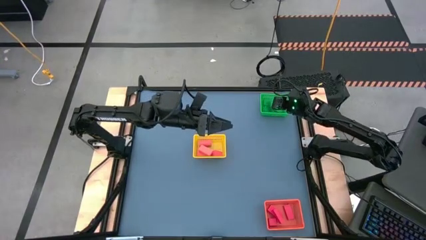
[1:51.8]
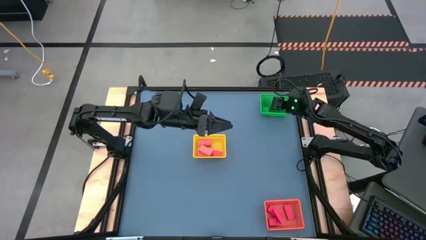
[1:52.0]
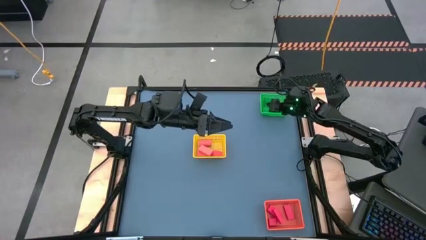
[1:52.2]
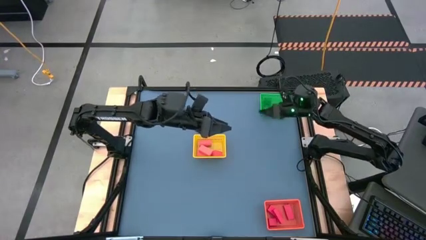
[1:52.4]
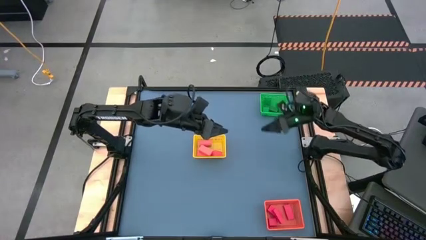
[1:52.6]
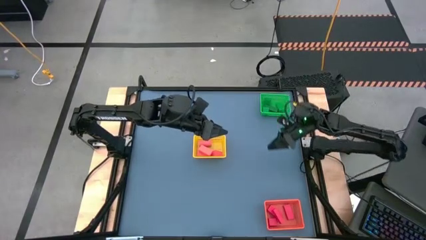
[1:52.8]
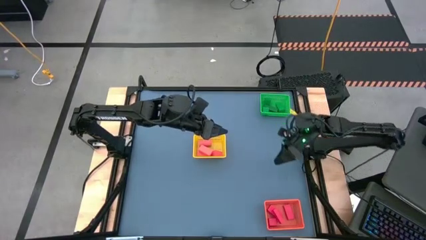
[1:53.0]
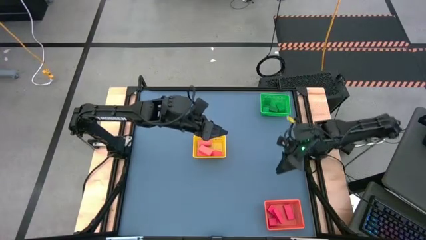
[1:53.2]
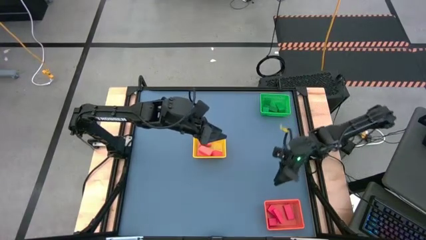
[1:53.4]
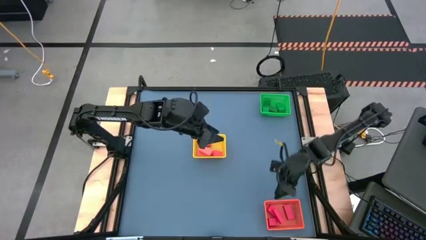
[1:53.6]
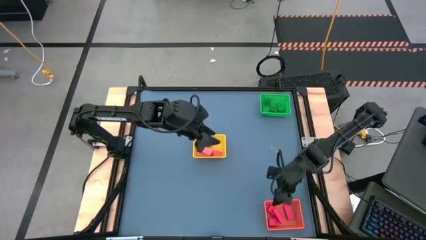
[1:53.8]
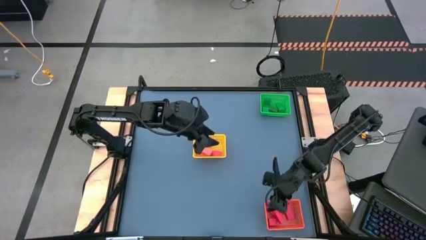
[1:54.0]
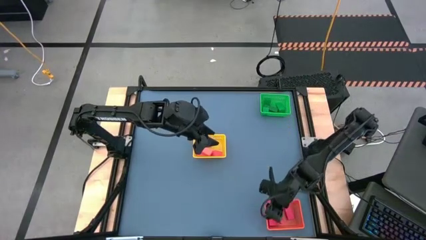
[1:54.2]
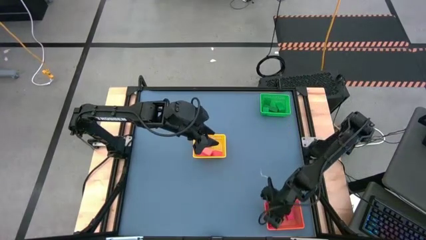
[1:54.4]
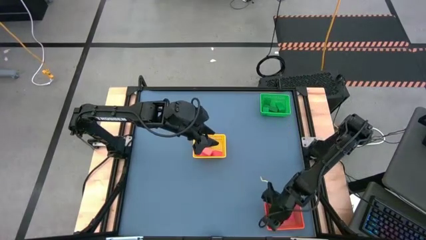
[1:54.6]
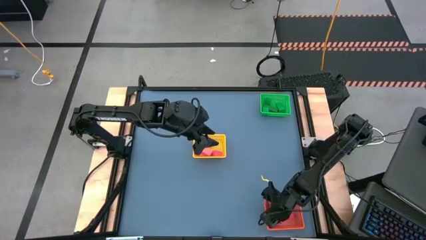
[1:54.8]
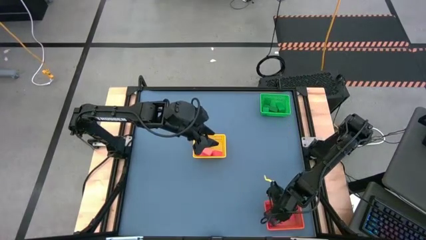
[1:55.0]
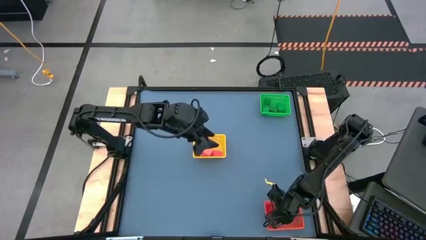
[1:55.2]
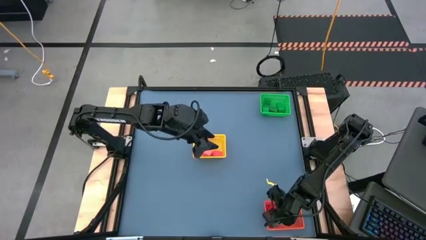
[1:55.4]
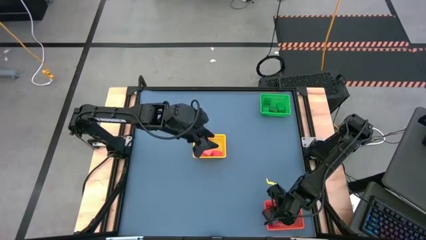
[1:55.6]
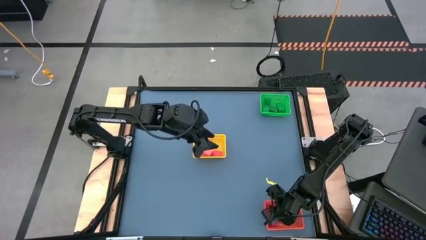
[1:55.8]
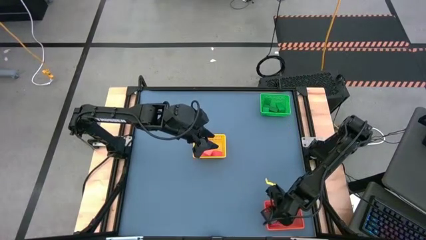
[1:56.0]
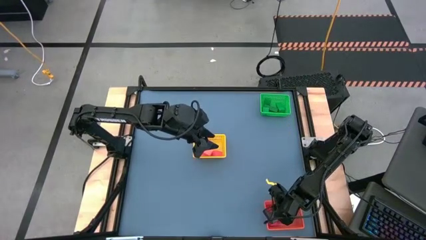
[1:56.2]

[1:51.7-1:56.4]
Task: Sort & place blocks by color
Adjust the red block in the orange basket

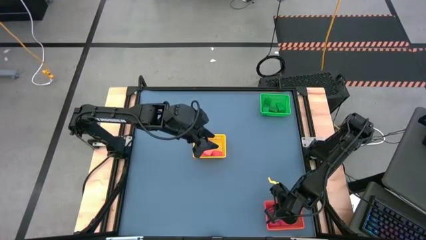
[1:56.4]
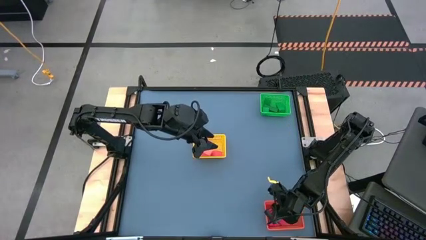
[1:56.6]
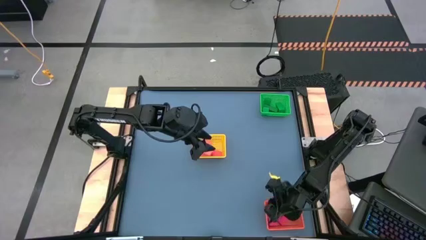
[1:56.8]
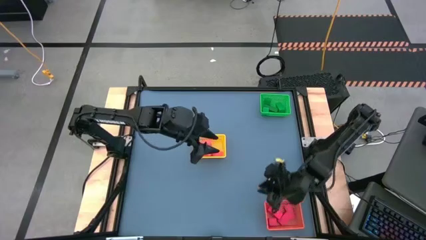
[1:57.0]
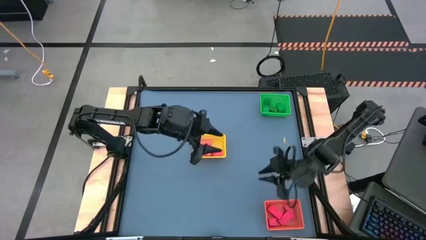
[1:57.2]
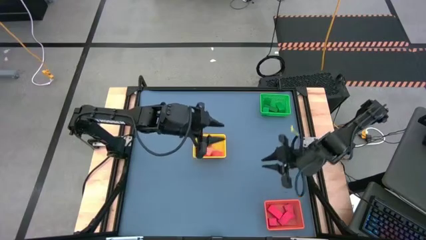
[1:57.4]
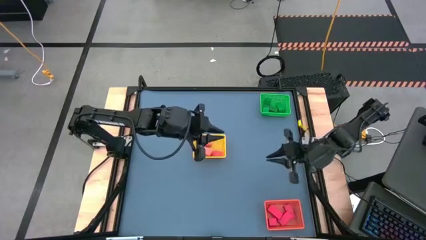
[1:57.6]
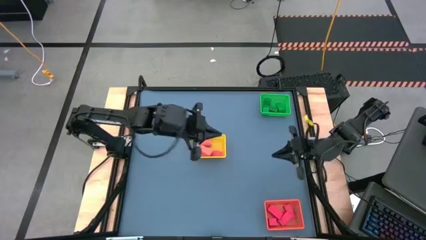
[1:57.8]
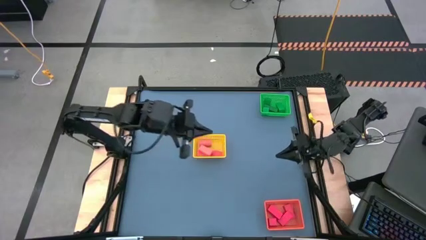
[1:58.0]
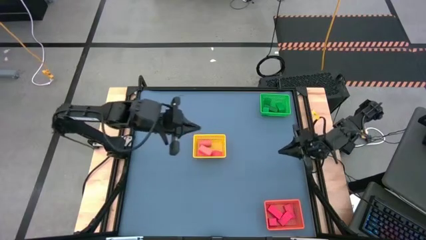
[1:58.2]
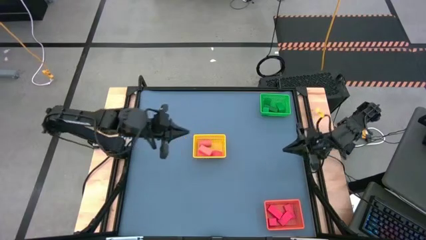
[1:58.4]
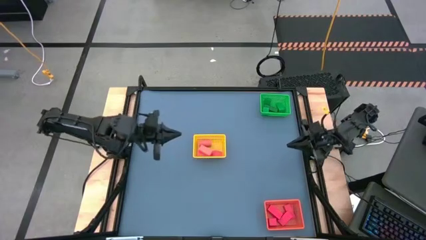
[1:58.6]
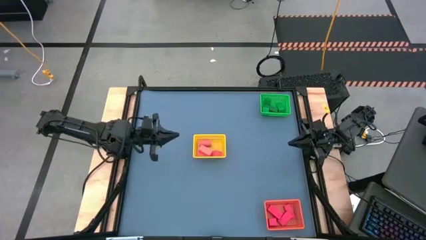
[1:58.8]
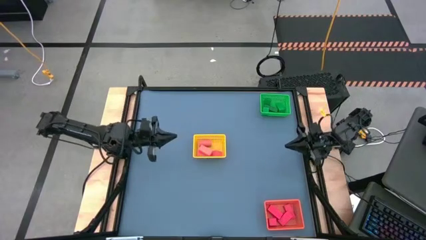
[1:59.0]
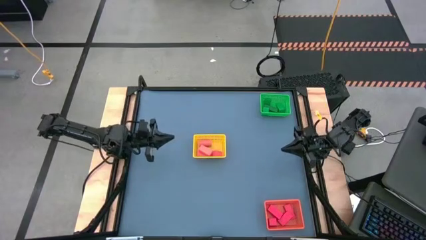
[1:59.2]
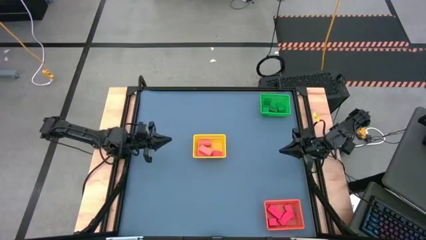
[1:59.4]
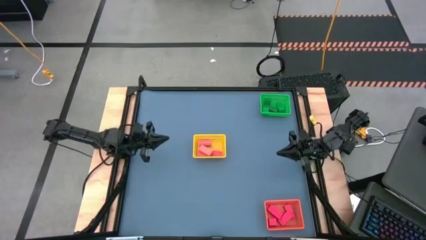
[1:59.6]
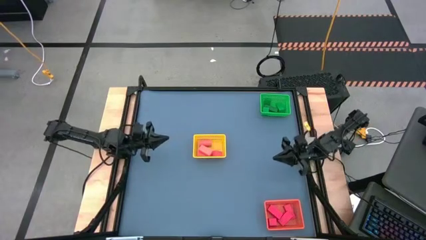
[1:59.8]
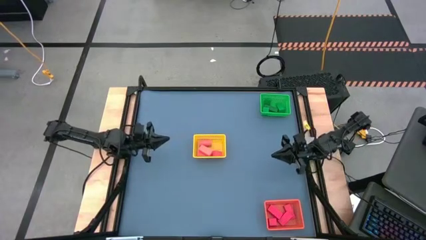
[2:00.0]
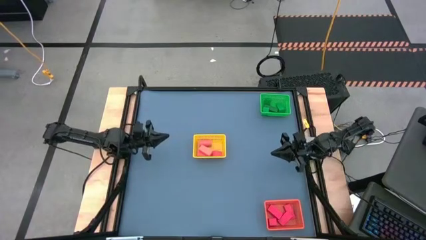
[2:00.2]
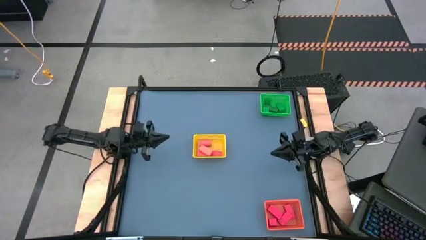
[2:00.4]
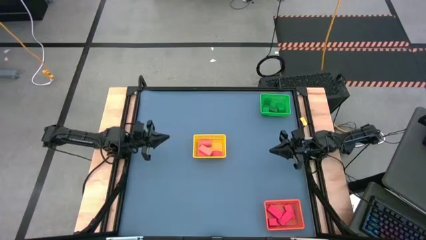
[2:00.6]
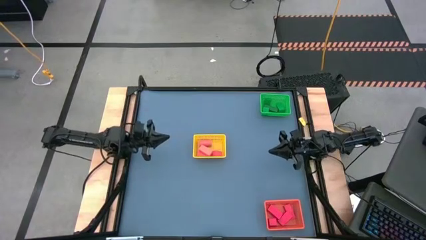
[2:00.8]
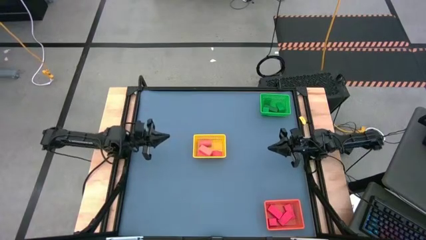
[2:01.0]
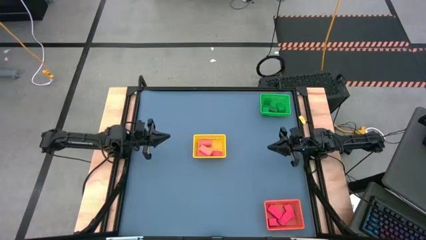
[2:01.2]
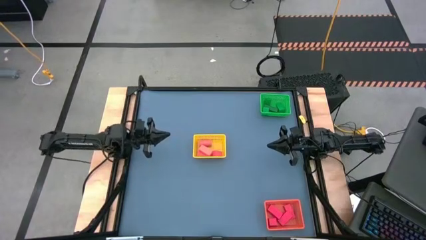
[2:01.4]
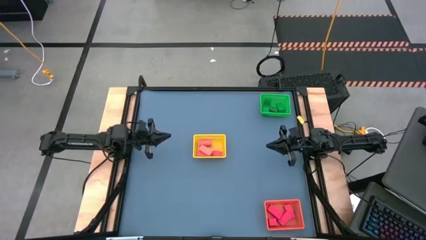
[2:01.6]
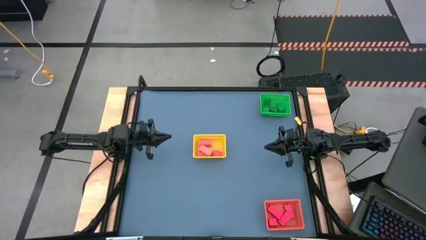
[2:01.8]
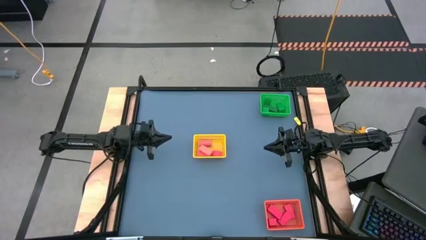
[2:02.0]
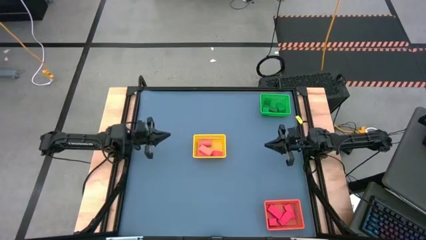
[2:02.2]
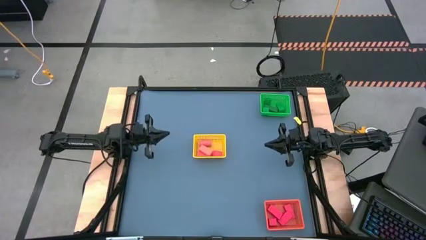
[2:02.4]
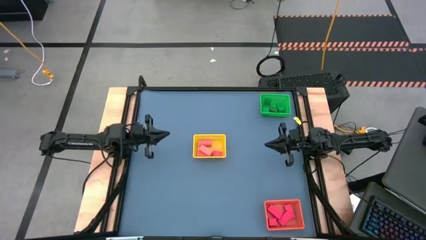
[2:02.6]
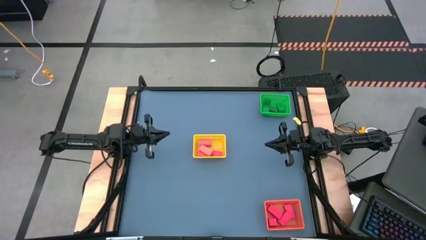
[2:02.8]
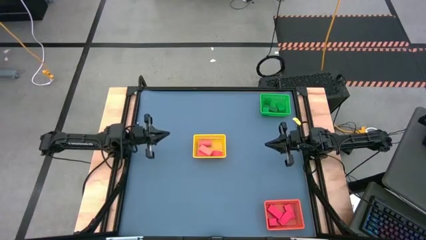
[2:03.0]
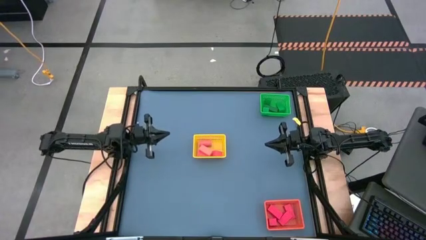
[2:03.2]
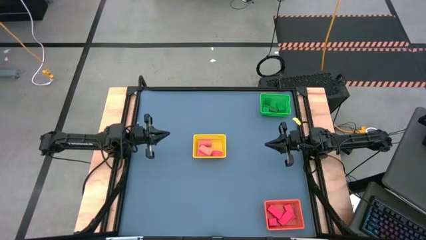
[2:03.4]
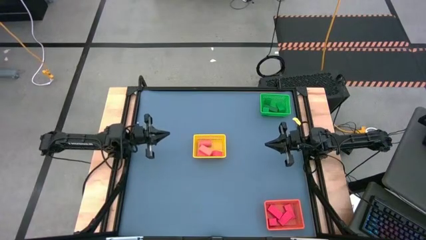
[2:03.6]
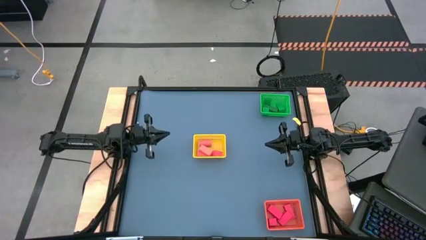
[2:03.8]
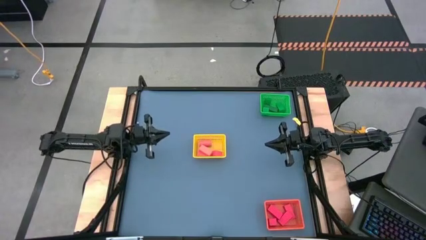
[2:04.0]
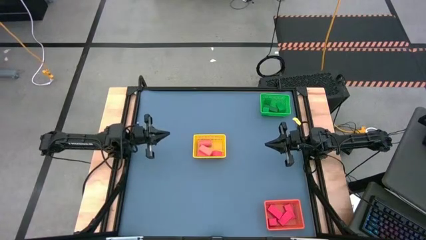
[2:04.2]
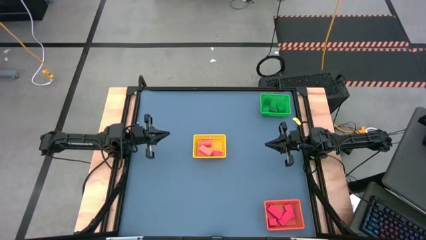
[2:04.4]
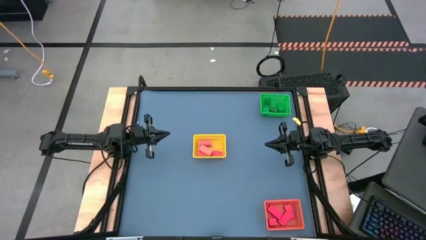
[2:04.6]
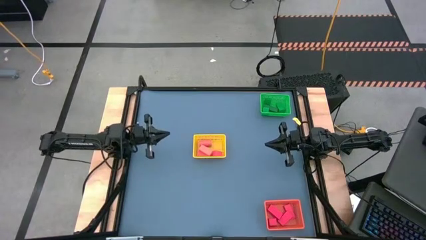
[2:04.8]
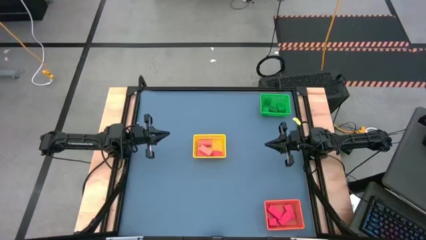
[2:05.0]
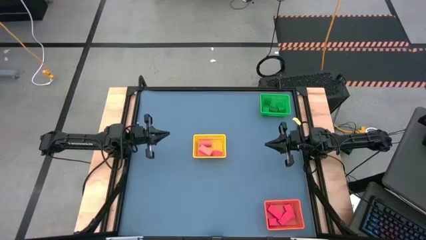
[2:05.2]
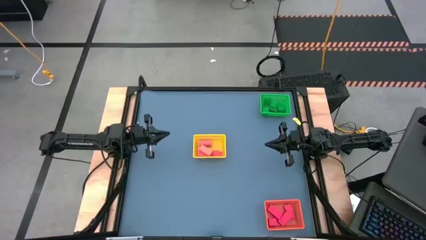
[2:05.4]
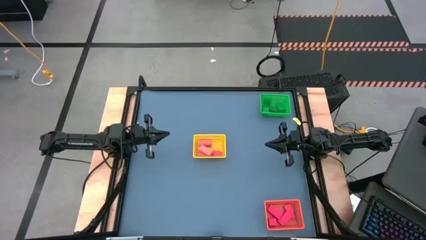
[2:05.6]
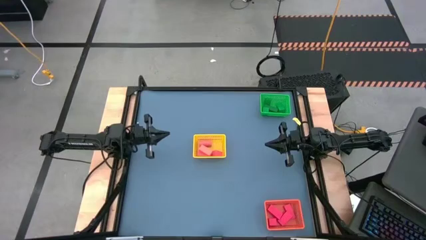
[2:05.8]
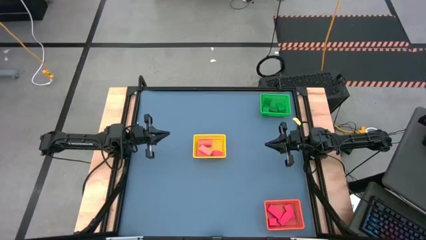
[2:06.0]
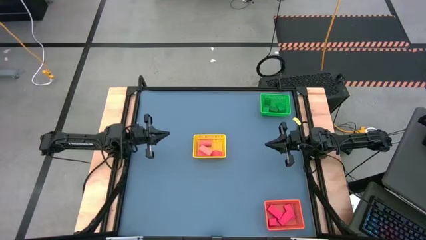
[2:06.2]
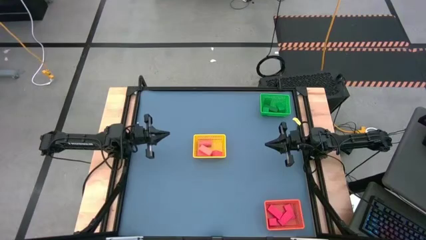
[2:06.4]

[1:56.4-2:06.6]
Return to Home Position
